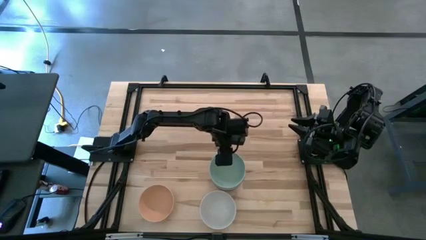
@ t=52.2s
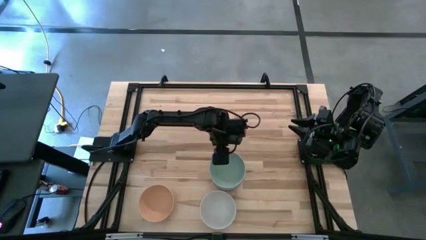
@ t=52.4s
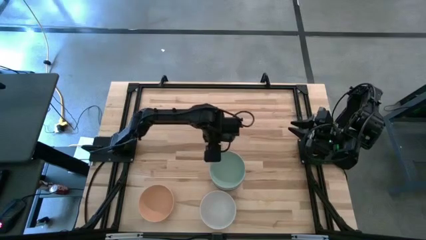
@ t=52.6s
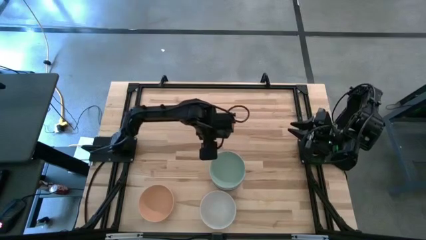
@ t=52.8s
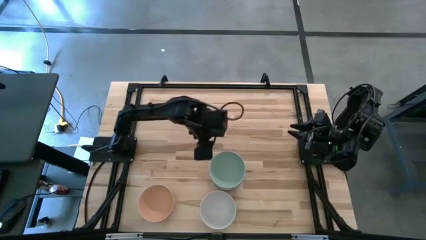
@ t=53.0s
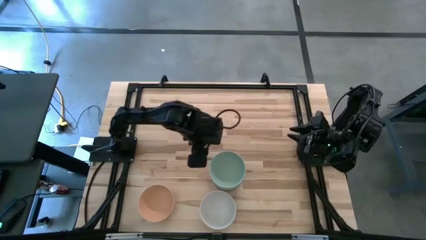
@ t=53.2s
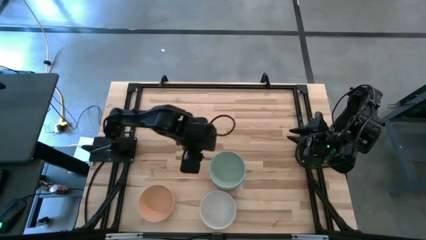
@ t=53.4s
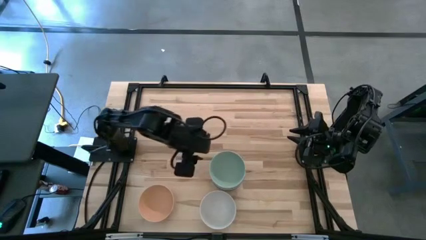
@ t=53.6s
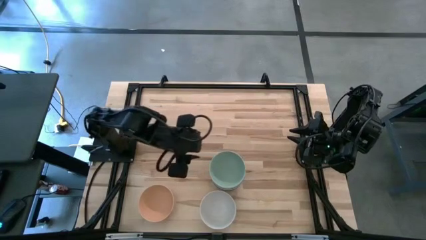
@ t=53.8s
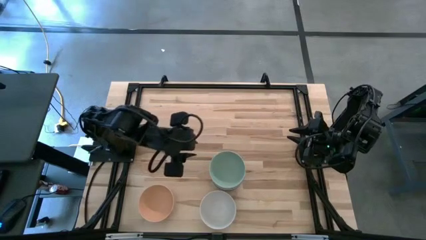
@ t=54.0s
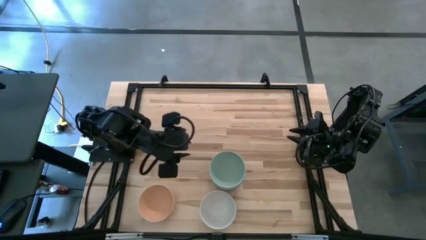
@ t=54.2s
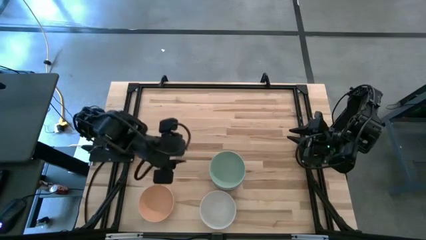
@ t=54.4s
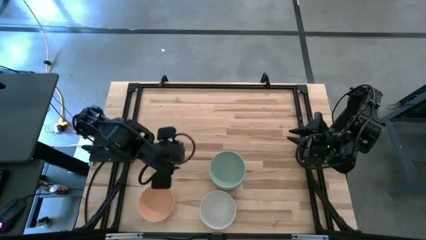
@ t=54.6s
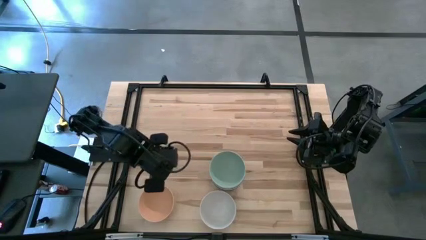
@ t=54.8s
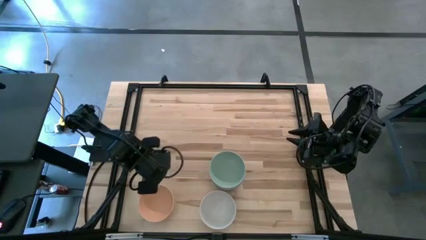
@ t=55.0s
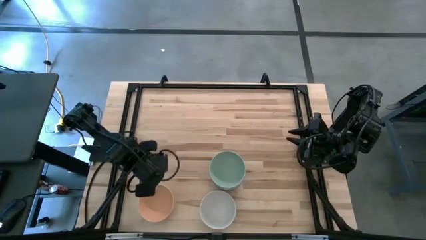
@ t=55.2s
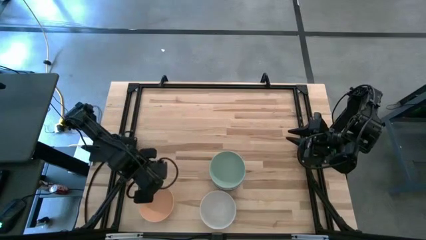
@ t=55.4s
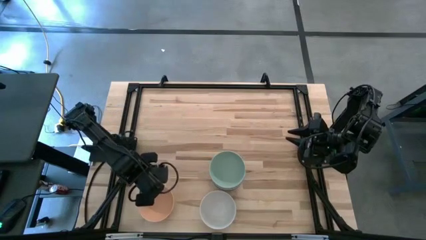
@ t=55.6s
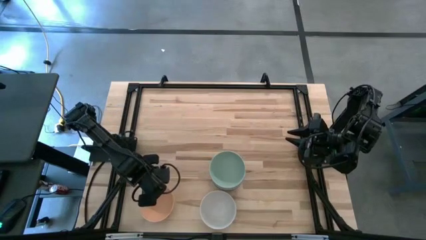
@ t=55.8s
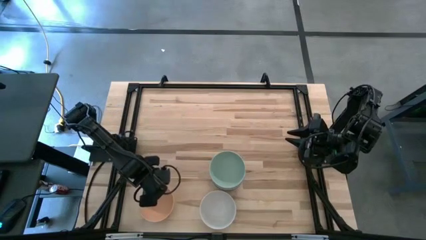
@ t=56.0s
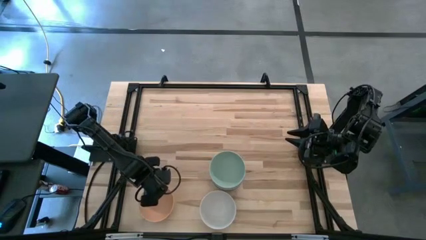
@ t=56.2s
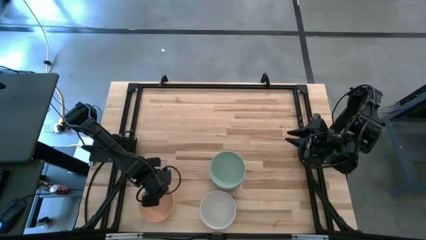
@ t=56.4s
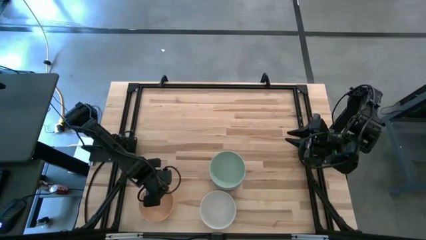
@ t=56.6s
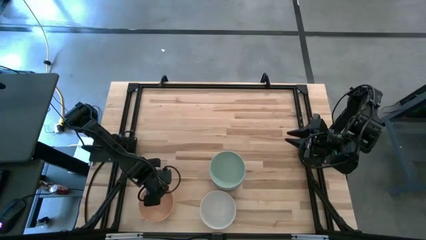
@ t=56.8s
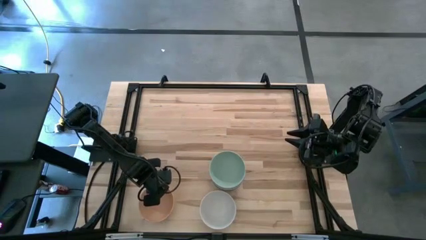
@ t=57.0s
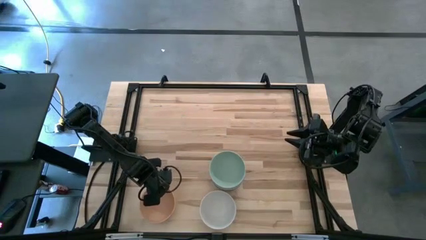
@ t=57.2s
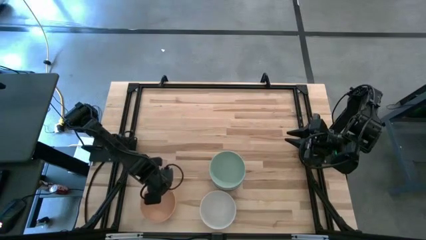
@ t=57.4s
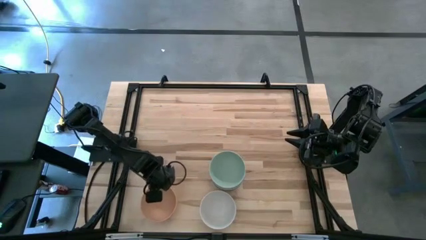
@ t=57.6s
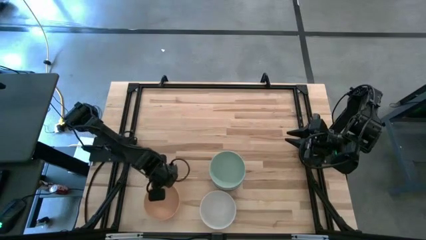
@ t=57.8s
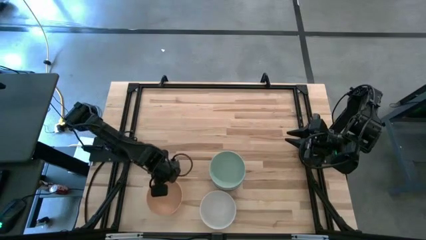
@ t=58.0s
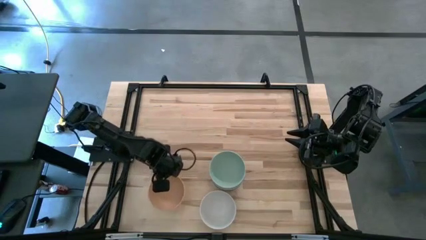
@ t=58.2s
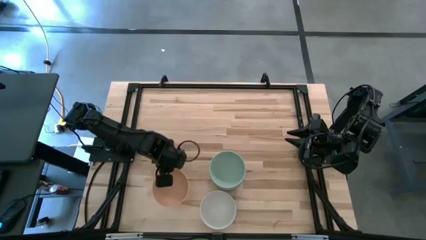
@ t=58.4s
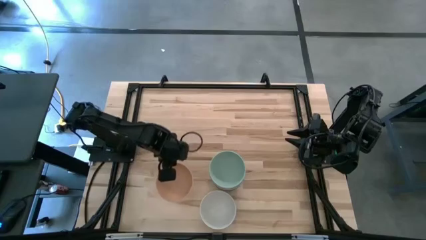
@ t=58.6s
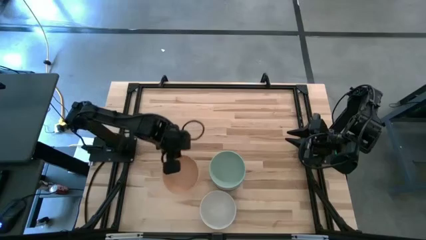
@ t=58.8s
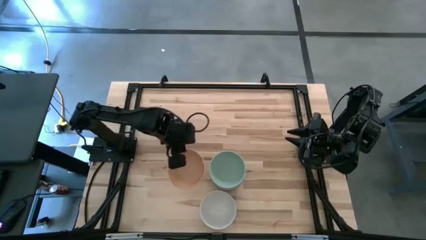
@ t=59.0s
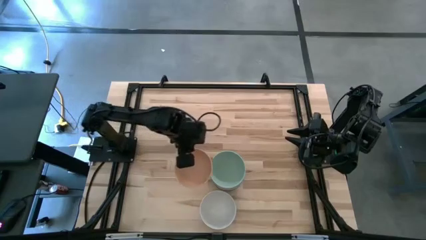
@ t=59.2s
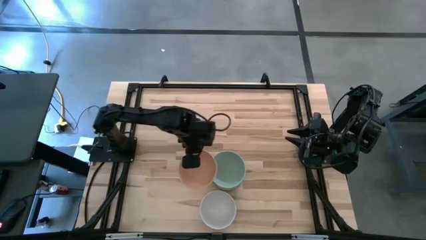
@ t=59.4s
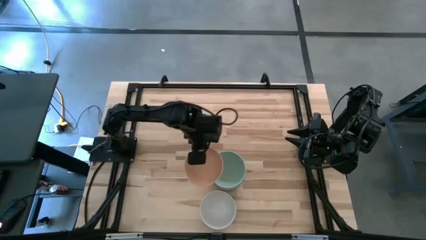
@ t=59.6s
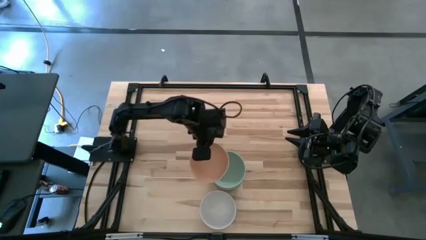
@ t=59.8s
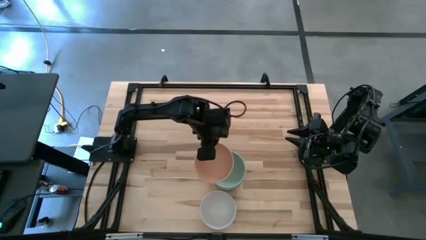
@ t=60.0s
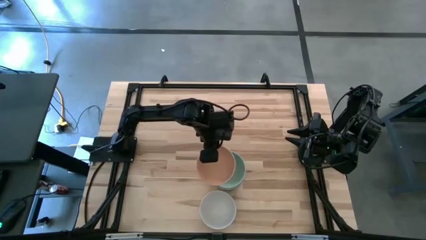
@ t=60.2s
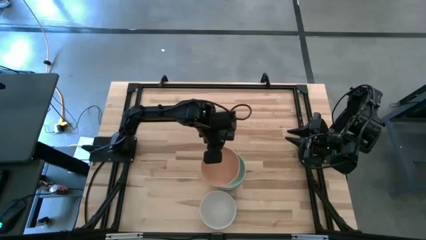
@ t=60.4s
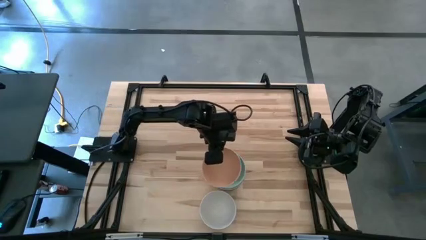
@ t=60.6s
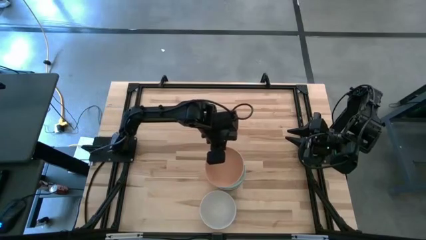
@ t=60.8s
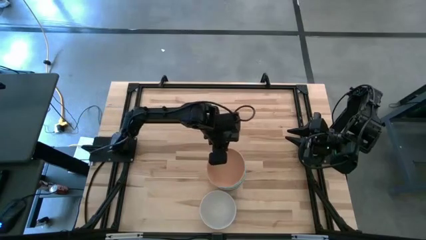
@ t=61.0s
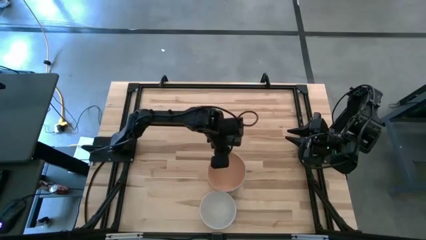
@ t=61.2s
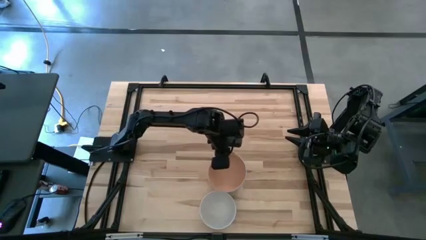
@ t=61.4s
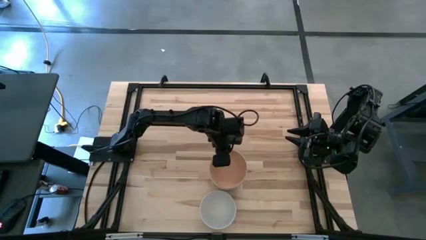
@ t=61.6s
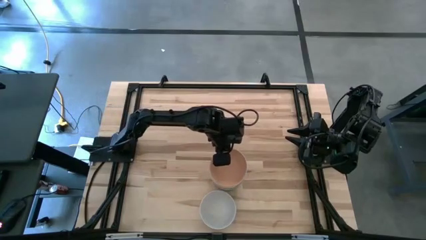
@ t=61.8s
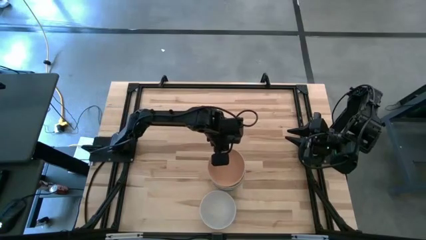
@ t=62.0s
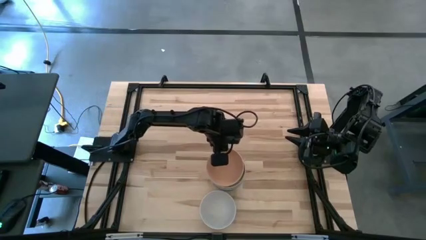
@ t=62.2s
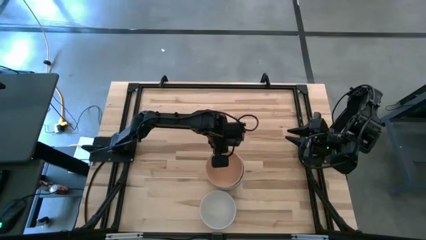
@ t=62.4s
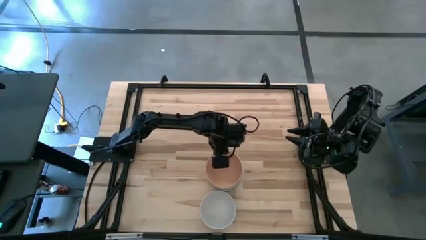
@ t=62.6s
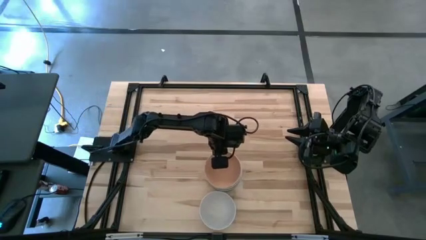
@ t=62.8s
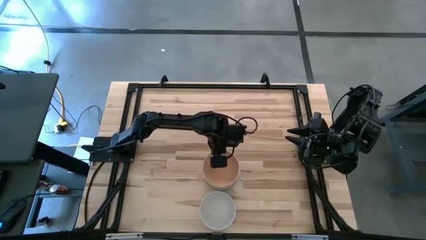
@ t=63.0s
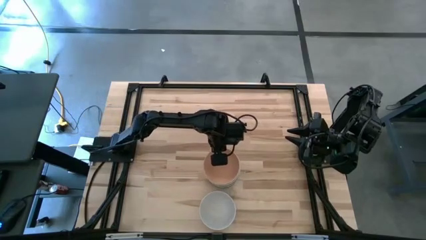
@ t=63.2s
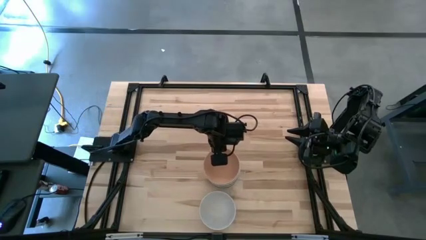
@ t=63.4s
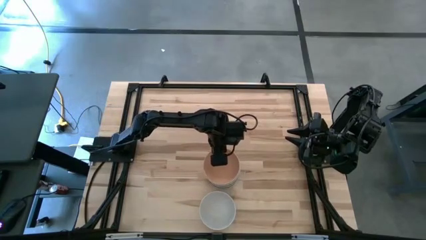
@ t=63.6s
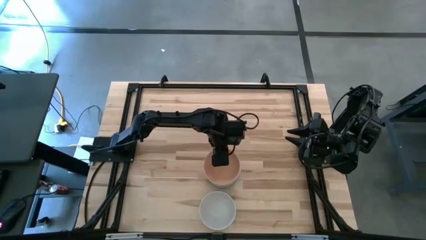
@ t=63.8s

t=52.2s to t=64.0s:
Task: Nest bowls inside each other
Stack the light orange bowl on top of the light blue bowl
